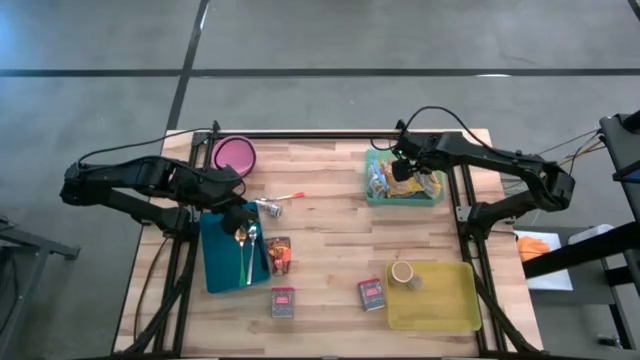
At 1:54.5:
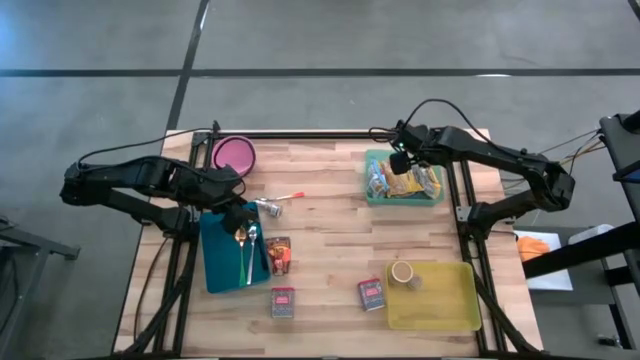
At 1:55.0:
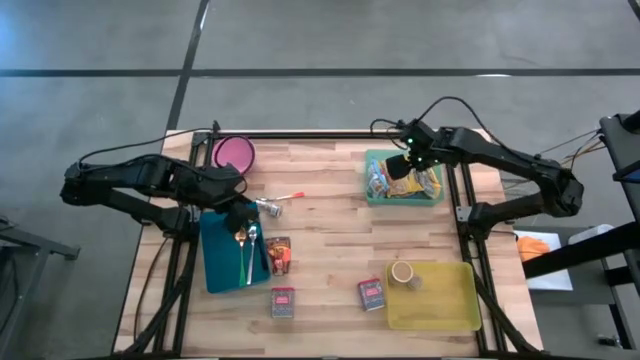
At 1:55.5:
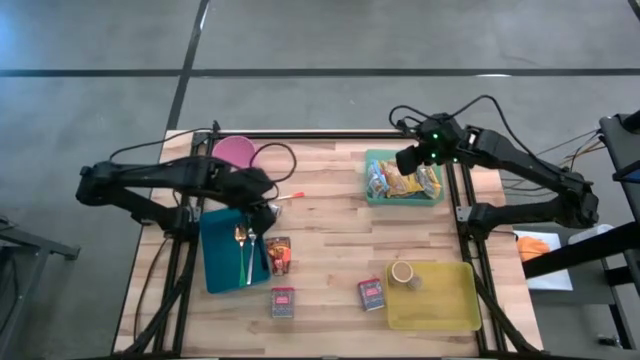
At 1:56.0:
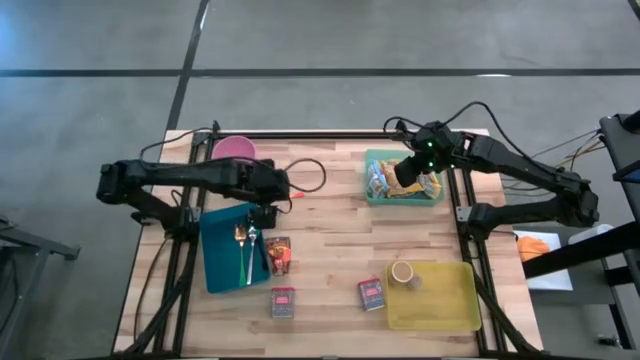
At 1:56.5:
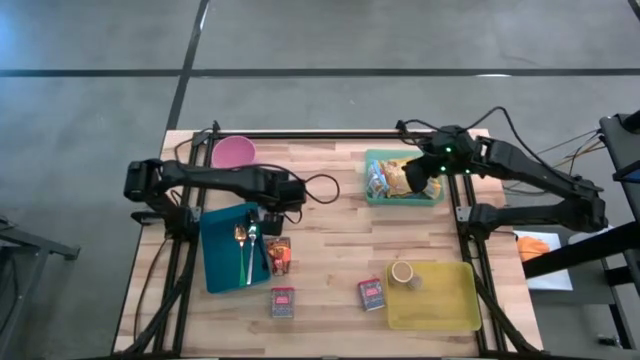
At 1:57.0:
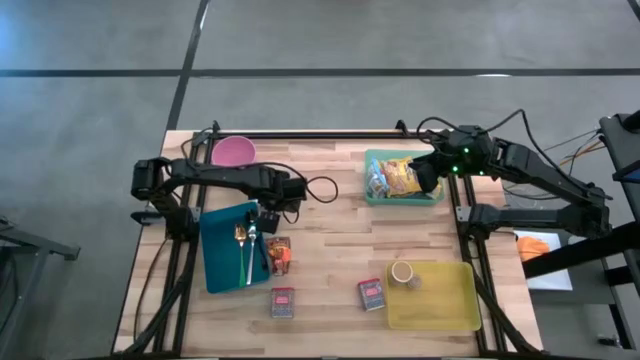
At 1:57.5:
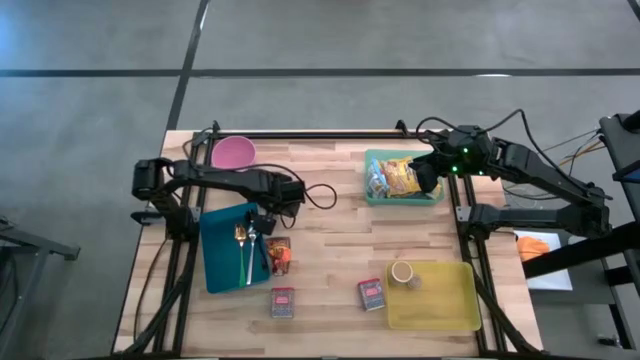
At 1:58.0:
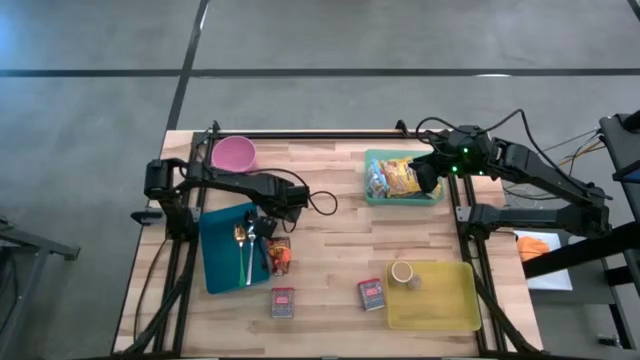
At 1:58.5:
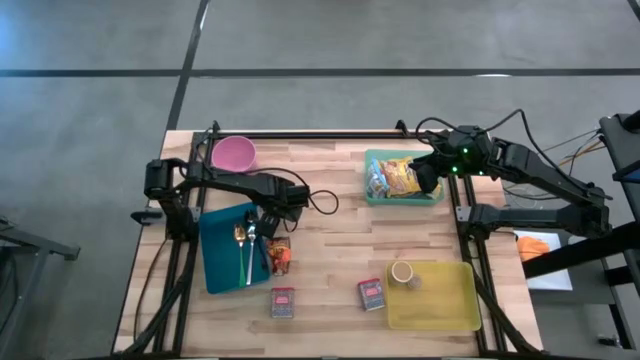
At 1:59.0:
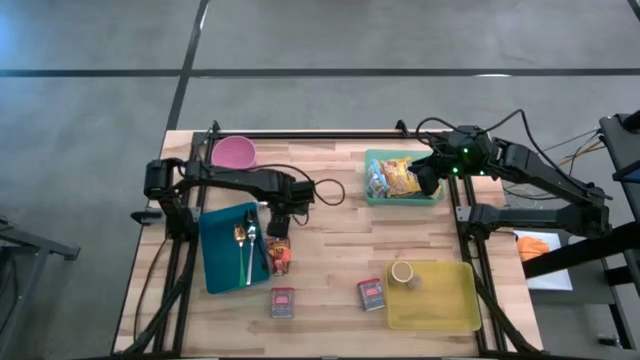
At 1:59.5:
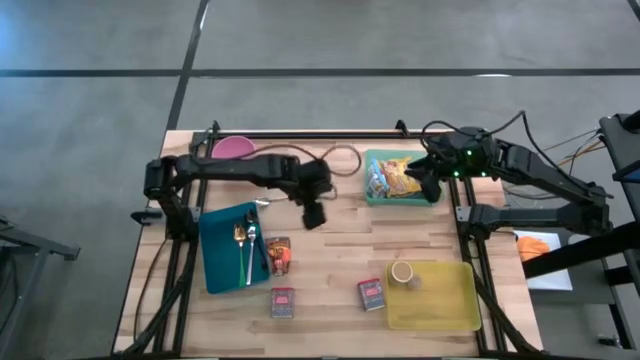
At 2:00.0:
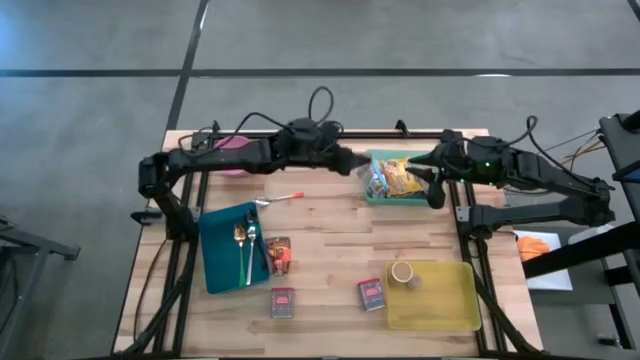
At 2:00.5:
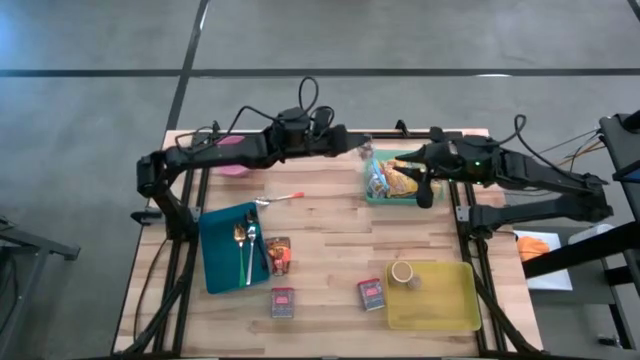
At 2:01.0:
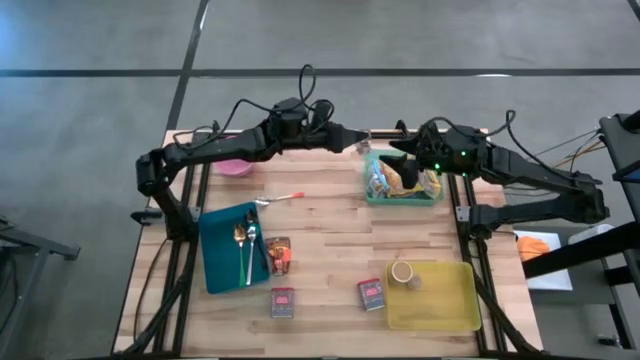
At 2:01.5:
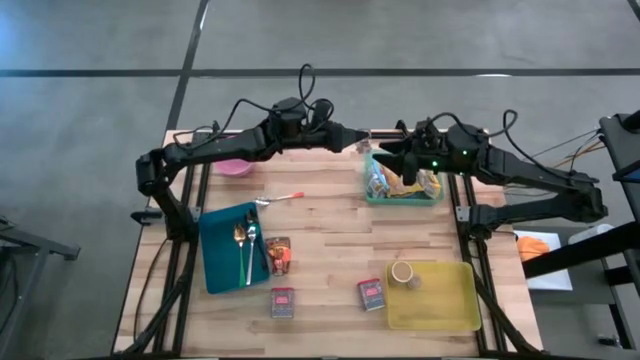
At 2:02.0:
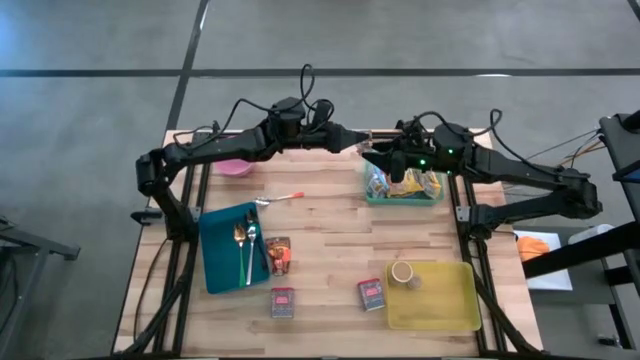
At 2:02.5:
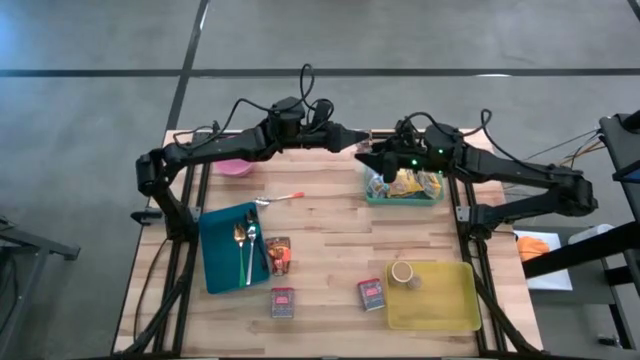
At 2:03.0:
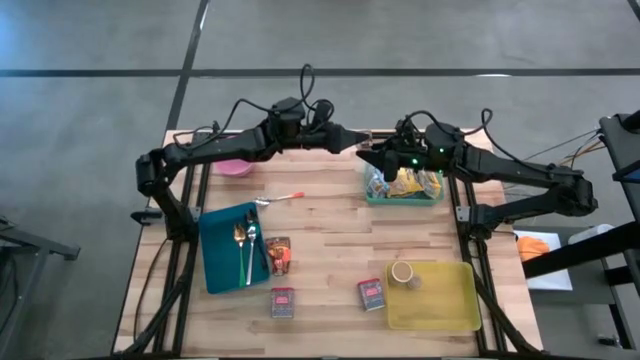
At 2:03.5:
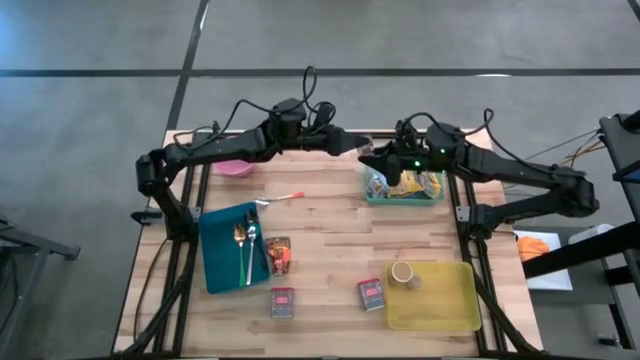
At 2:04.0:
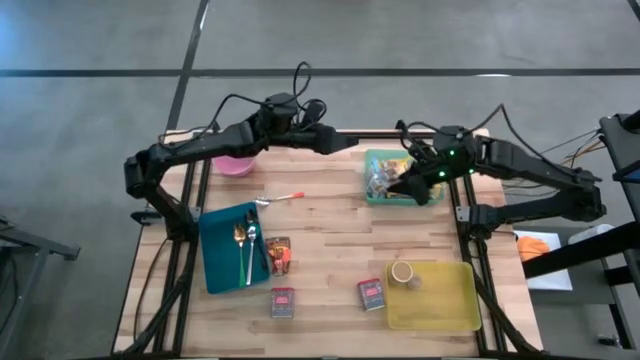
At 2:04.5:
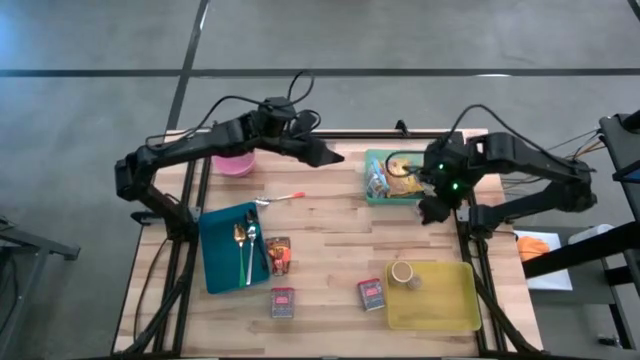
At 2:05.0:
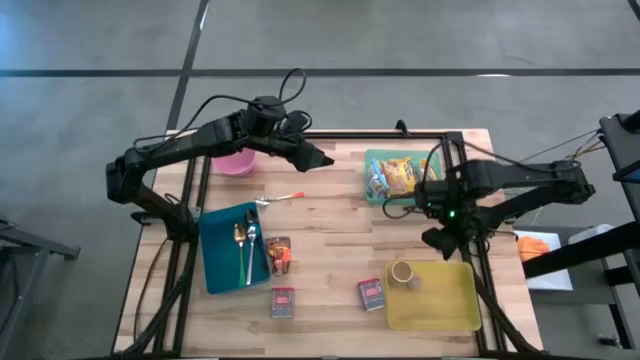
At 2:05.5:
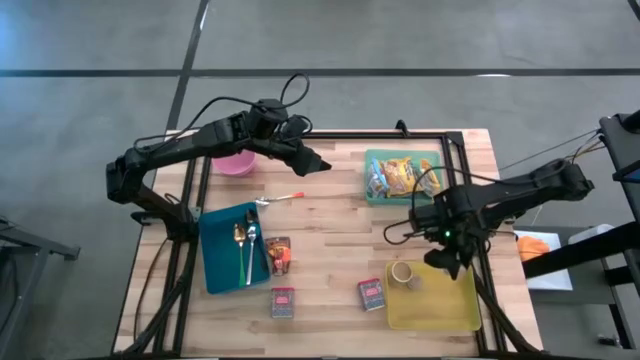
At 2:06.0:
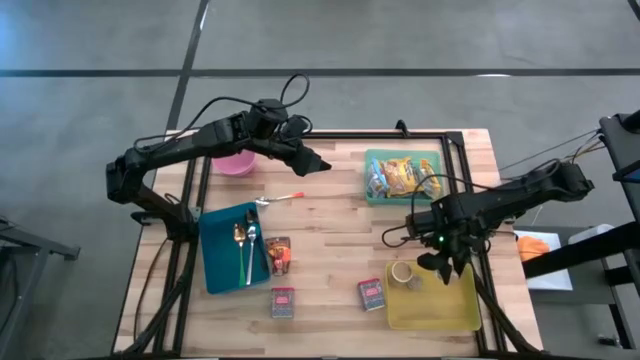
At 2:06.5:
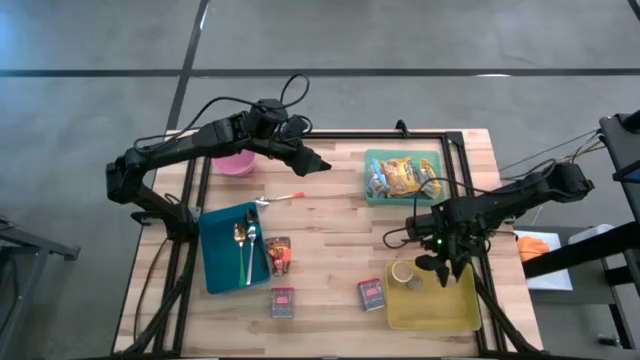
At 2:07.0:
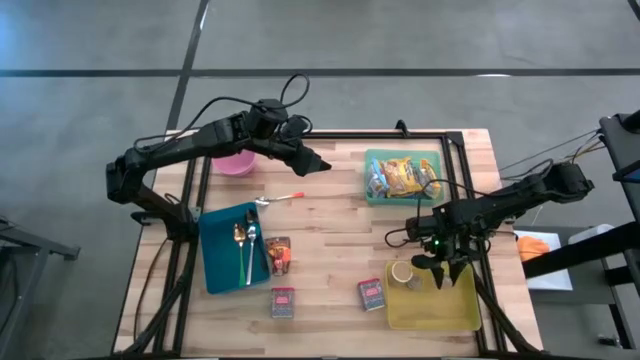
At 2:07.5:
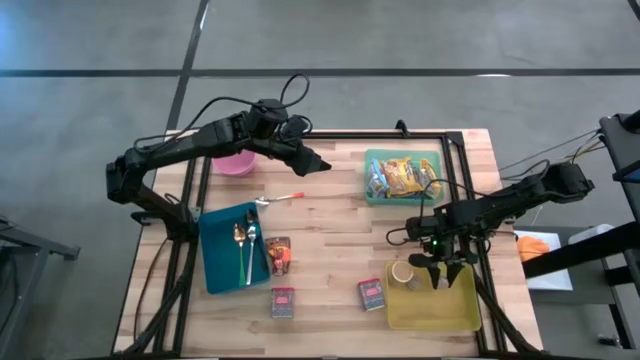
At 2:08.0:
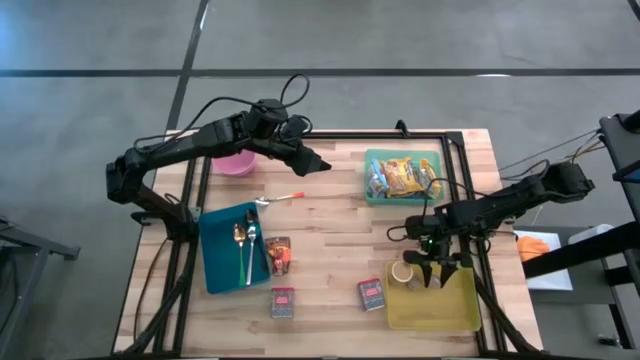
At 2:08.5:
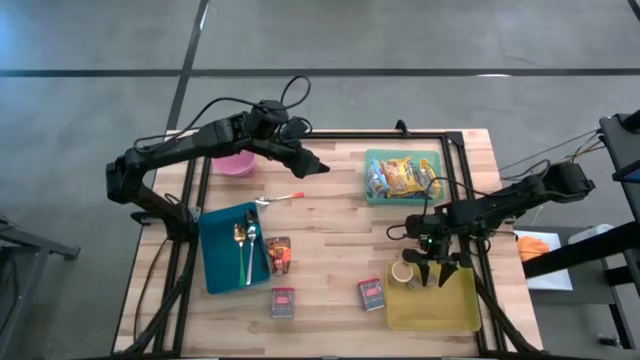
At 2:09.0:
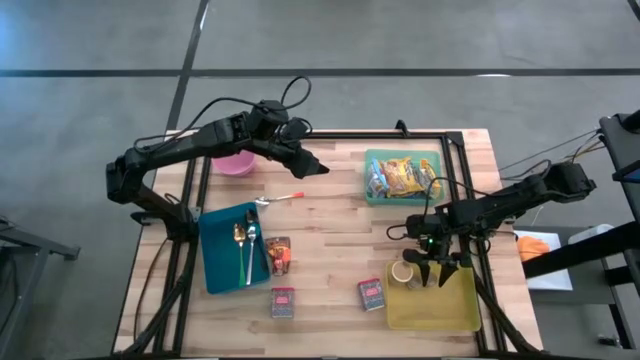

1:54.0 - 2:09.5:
Put the brown spice bottle into the yellow bin

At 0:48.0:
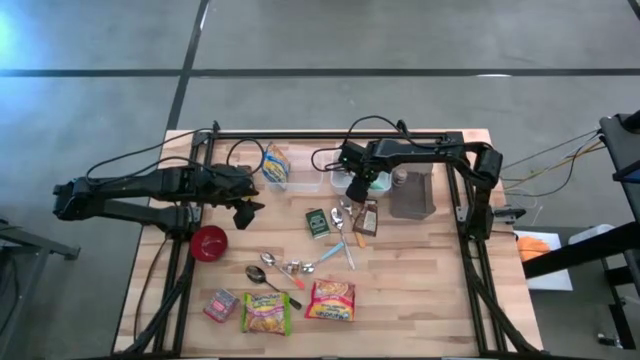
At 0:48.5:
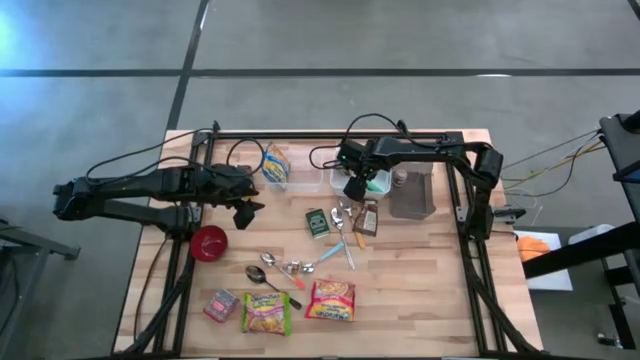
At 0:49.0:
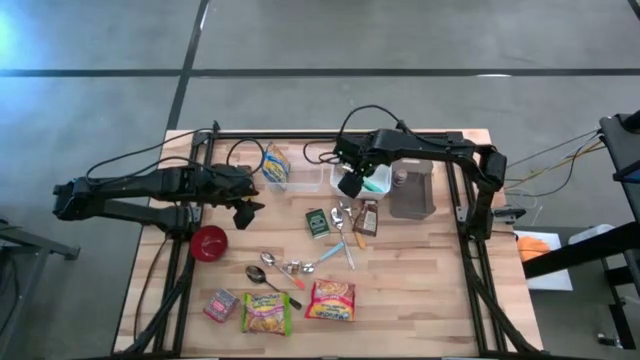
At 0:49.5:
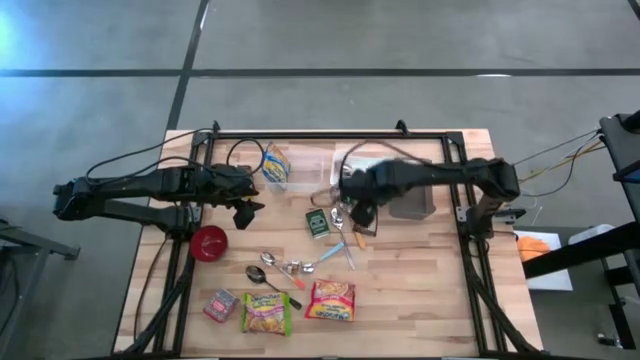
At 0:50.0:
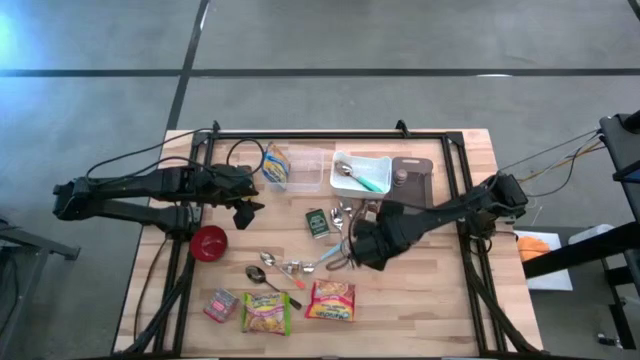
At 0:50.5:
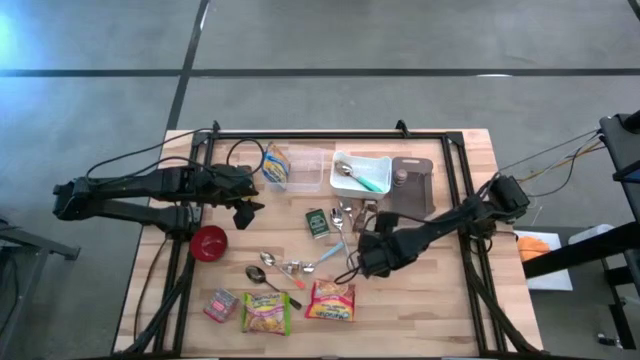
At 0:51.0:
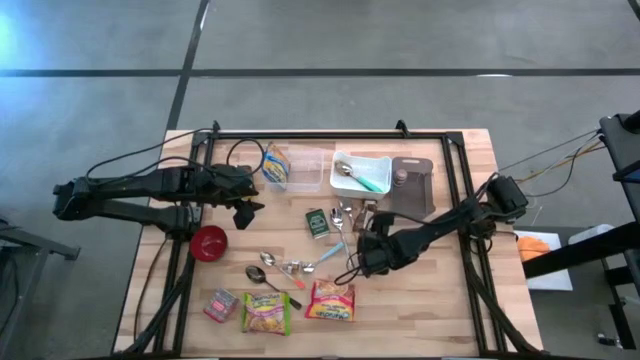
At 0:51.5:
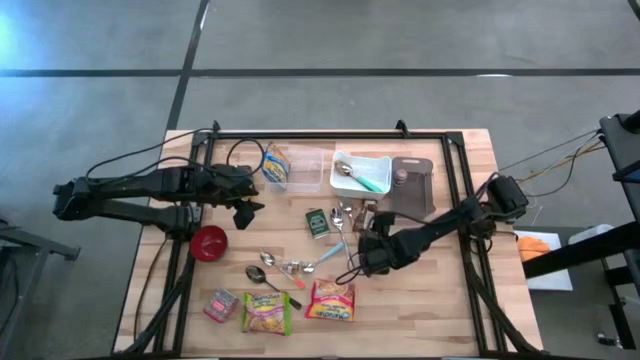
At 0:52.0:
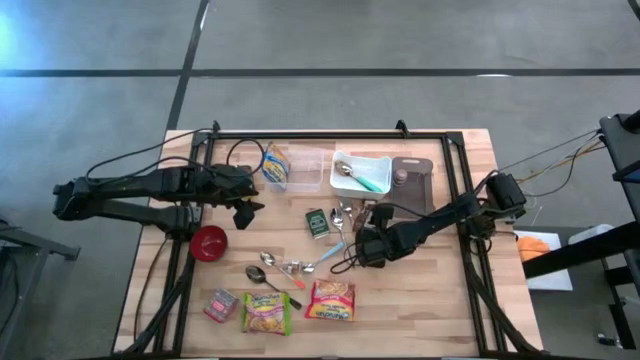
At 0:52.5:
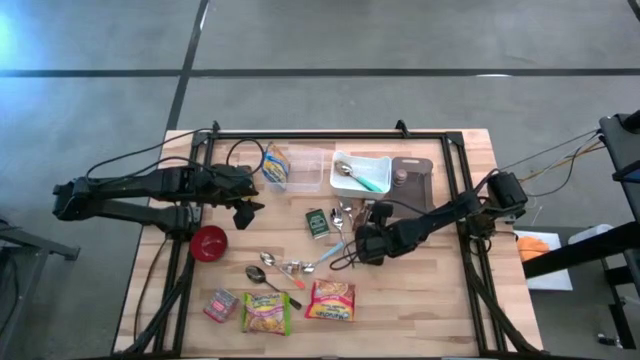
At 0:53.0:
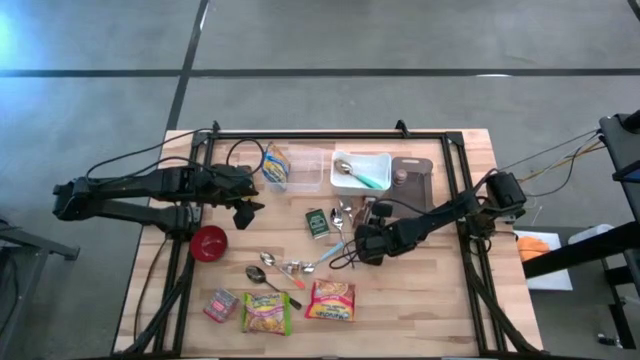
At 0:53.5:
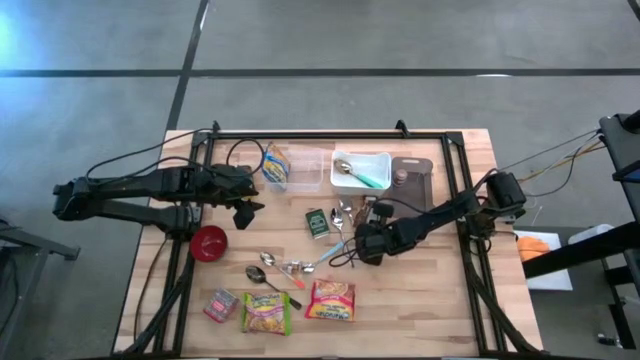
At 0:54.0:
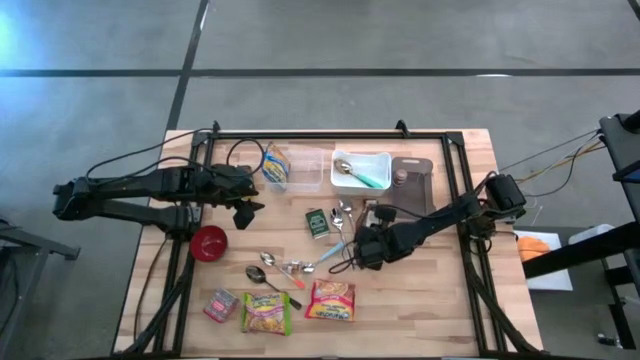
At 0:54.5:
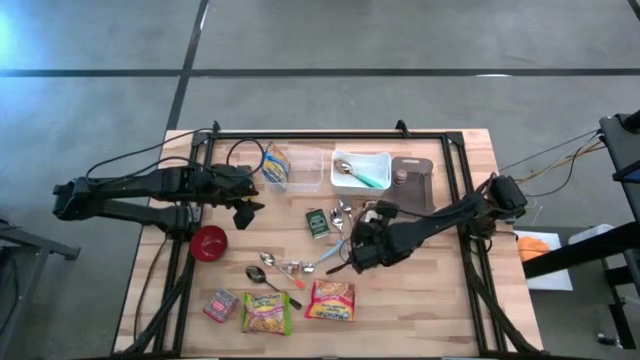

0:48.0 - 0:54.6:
Put the orange seasoning bag into the black bin

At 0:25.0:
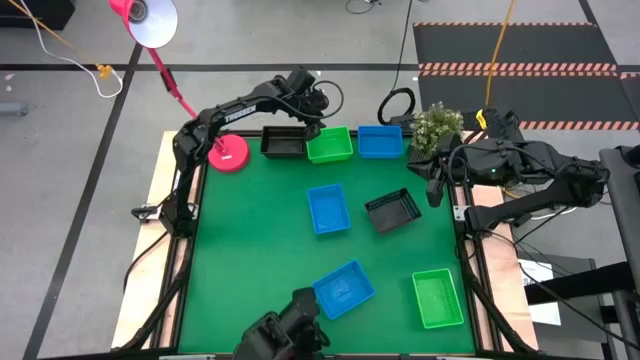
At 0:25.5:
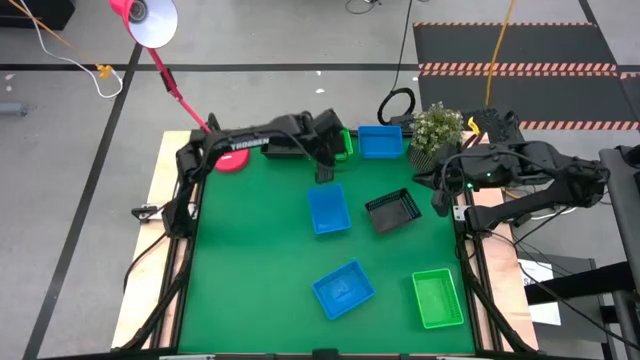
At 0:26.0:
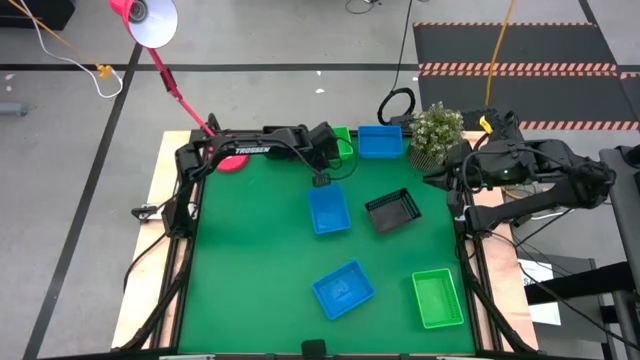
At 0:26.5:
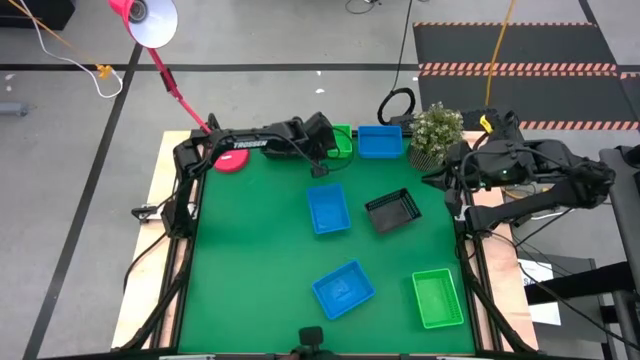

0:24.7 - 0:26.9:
Adjust the stacked green bin
